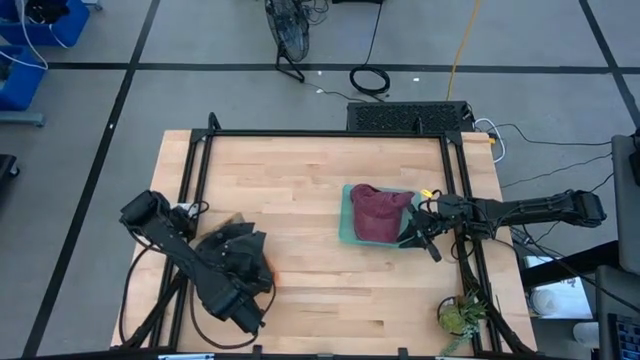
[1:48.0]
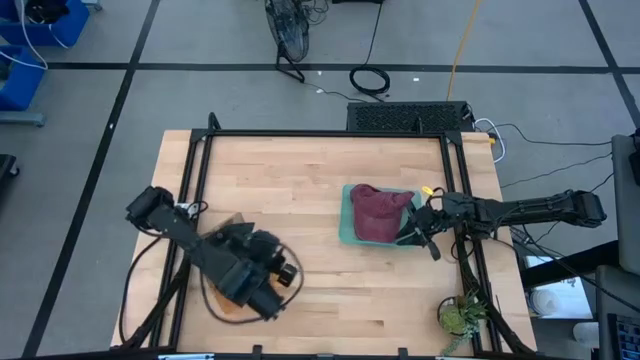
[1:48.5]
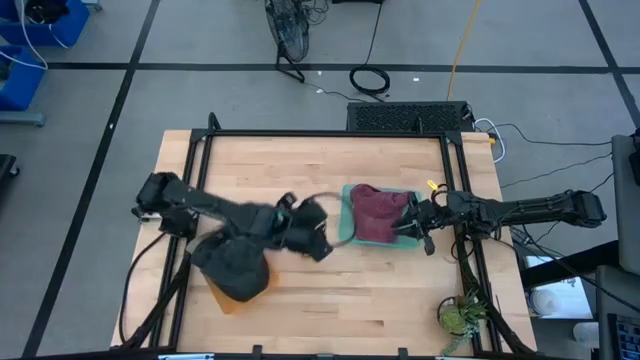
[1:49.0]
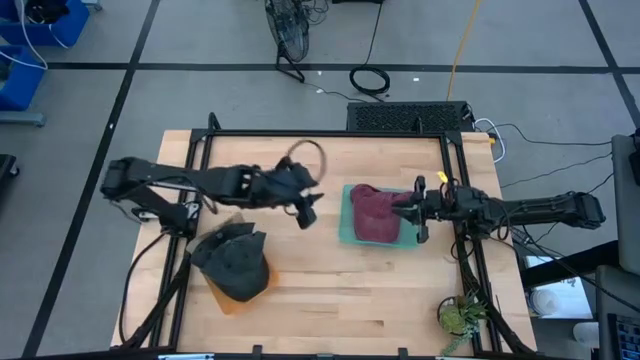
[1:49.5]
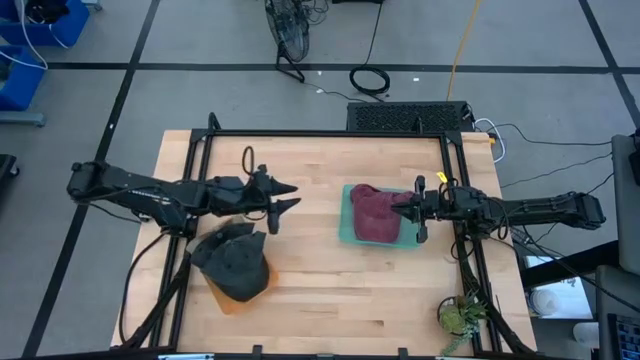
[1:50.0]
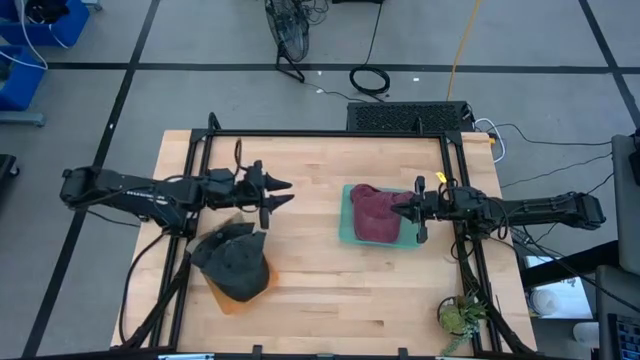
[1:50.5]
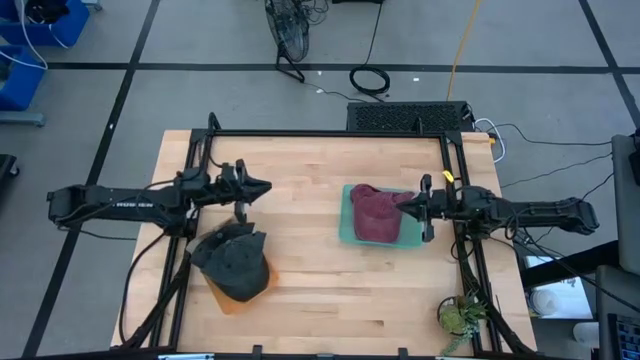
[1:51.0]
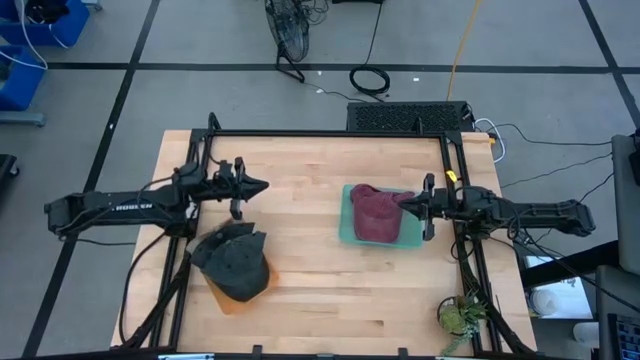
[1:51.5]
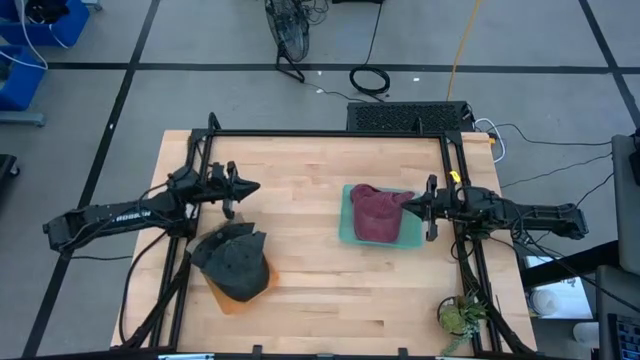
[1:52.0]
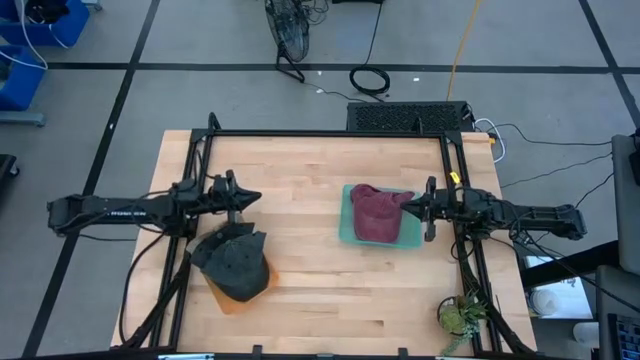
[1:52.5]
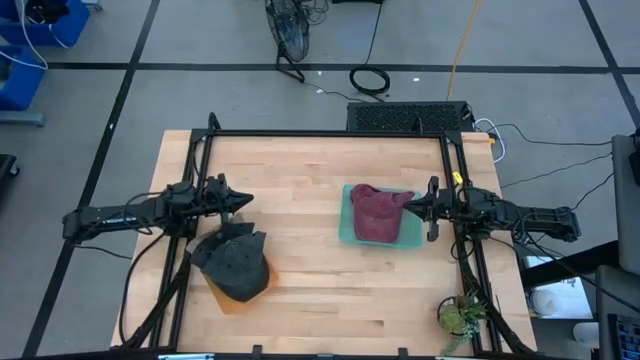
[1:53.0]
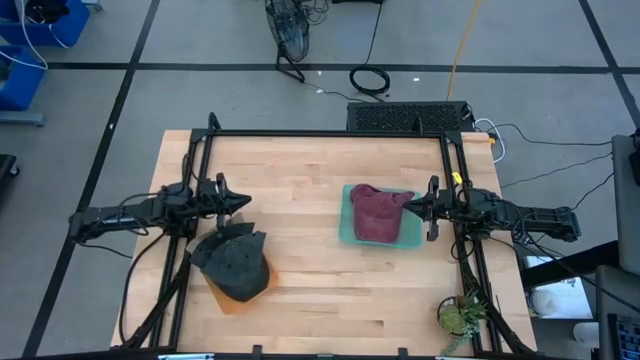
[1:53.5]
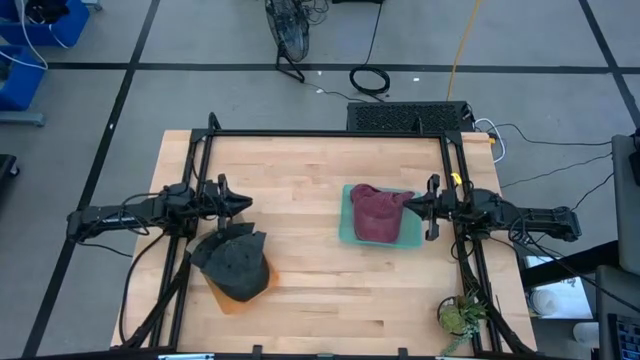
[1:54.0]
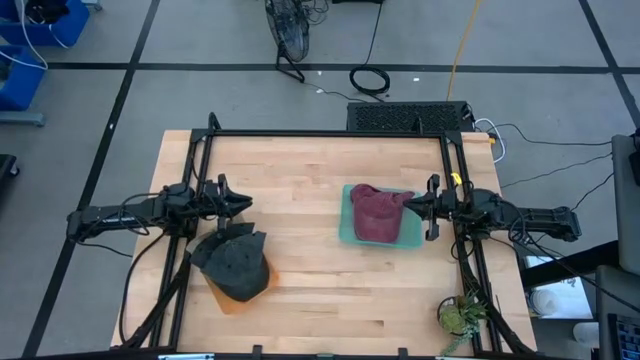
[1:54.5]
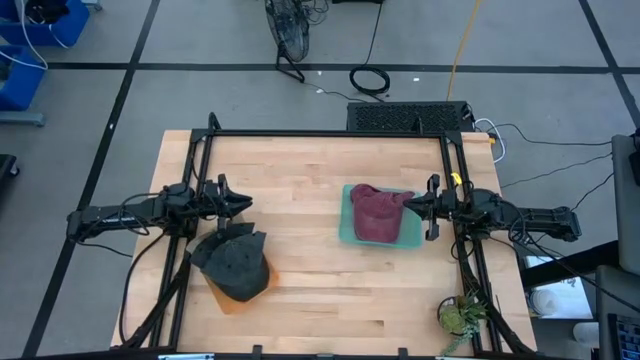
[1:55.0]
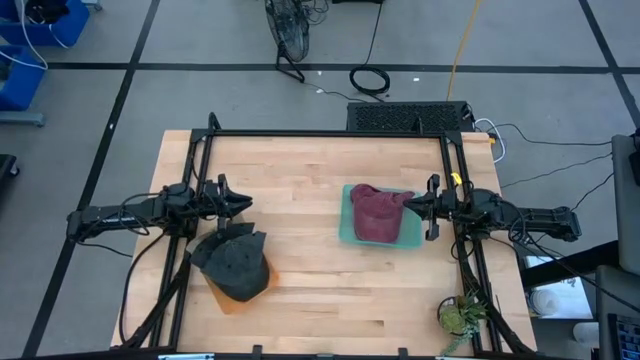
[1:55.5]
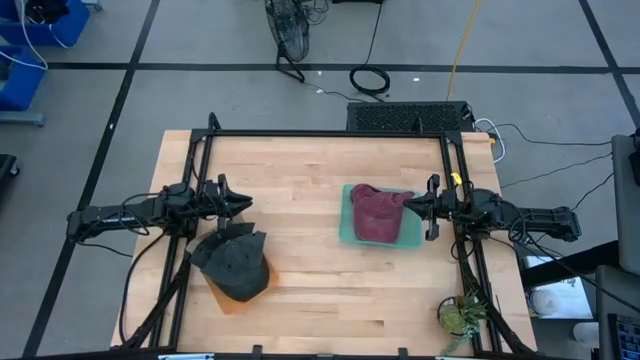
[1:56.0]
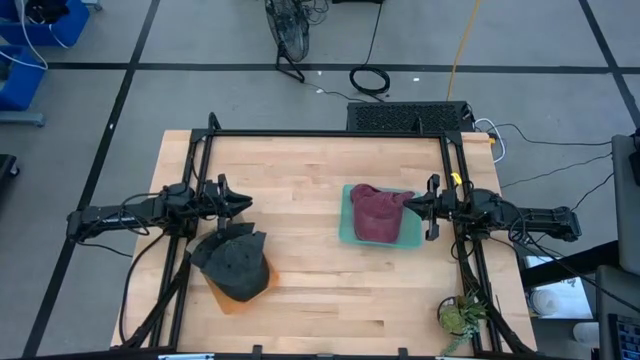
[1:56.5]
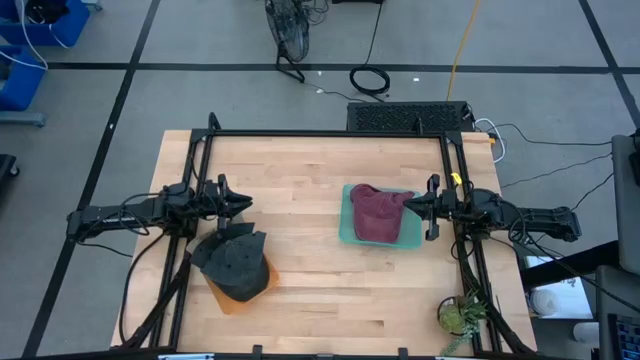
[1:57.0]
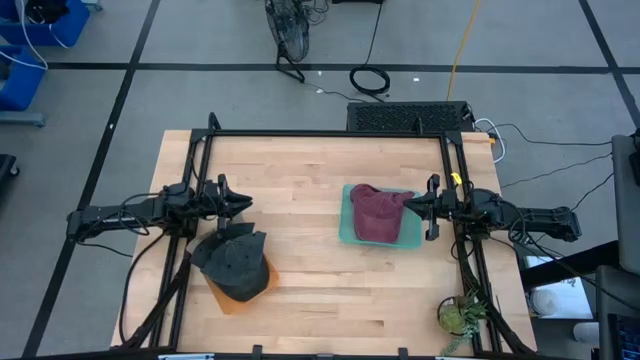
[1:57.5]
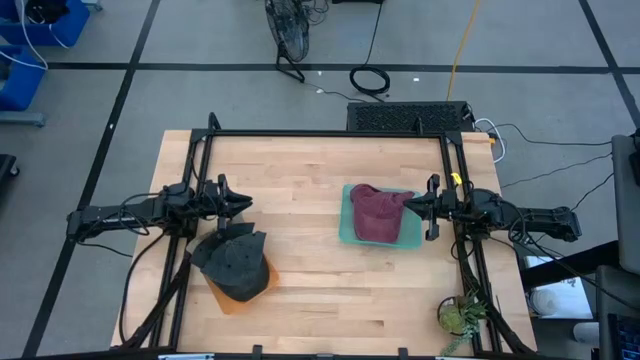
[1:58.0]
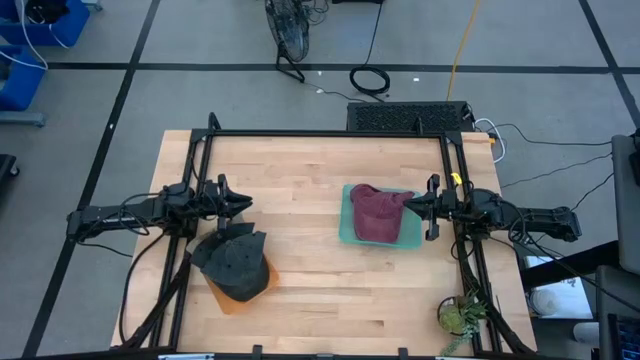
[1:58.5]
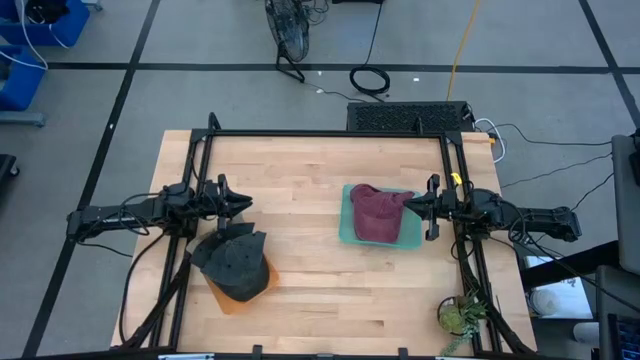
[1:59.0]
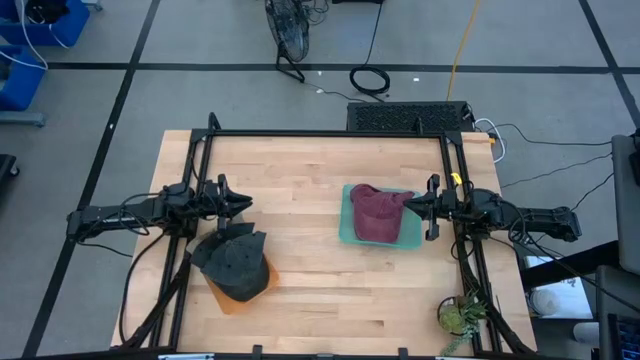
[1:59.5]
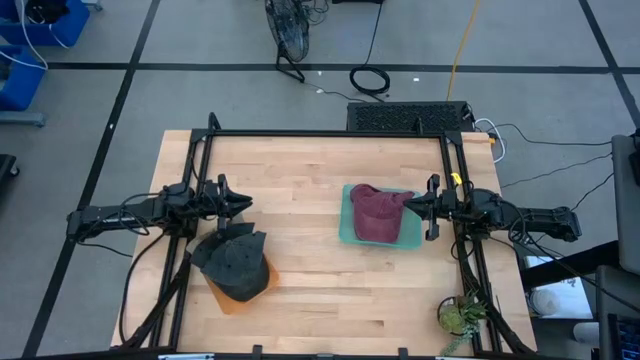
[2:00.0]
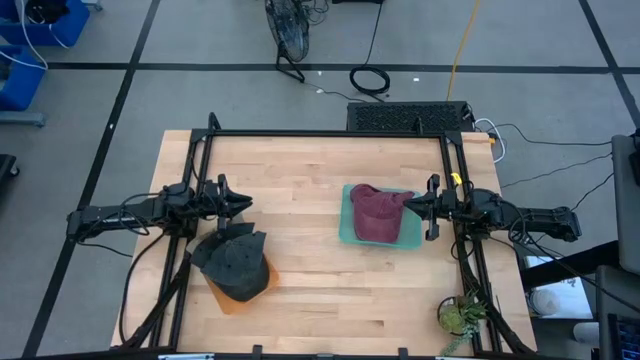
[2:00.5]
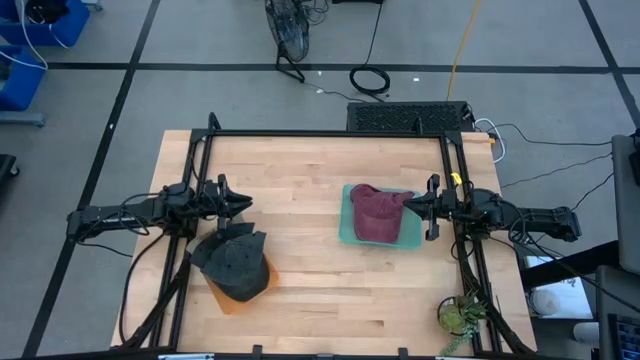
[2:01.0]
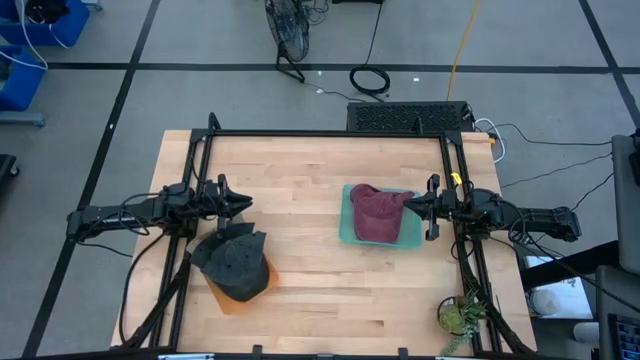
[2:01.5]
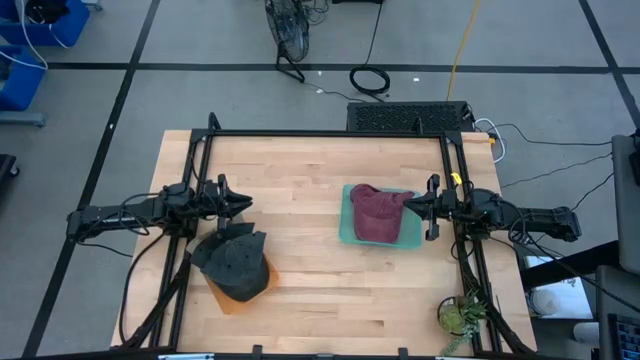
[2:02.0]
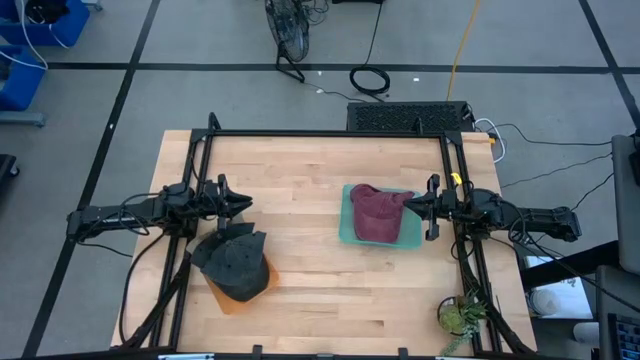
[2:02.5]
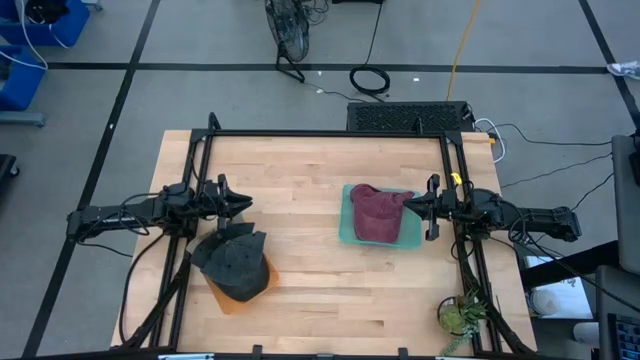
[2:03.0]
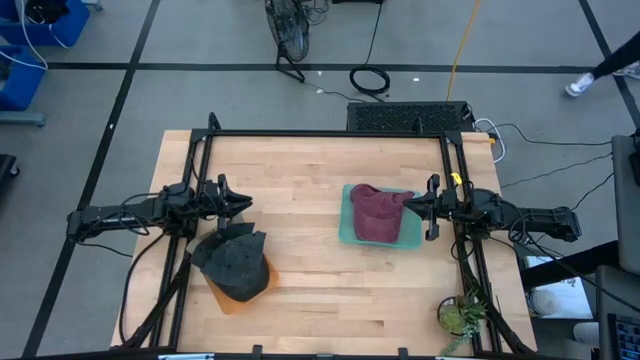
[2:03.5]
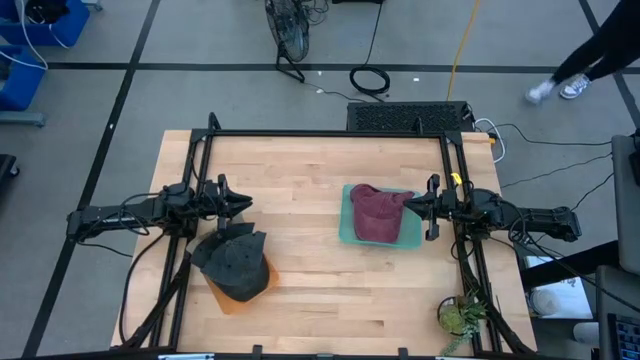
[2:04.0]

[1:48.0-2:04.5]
Task: Pick & Place hat
Return to Home Position

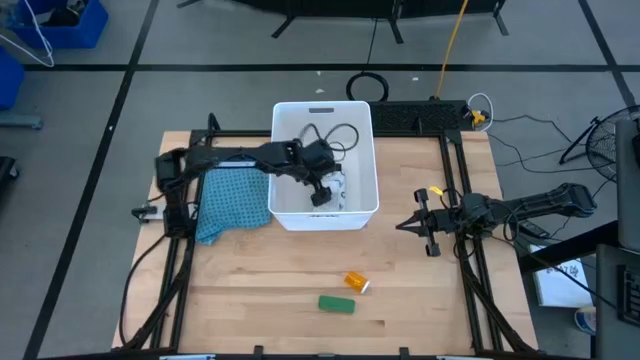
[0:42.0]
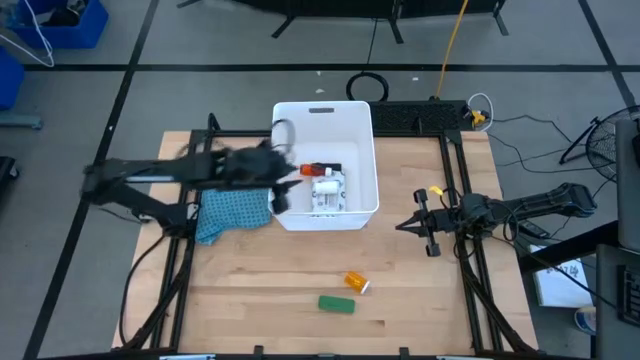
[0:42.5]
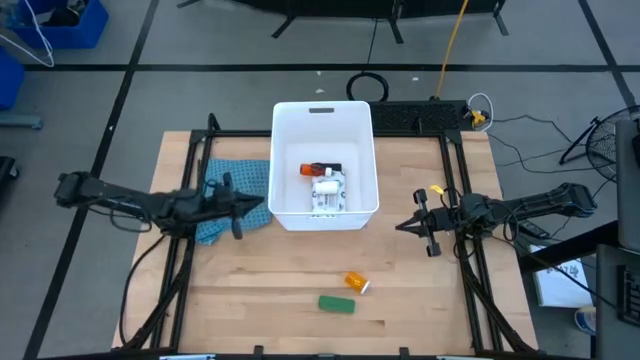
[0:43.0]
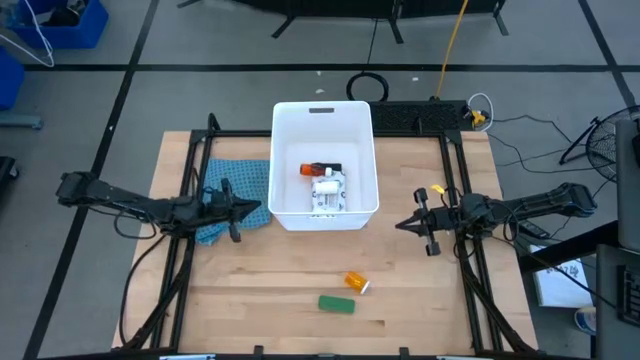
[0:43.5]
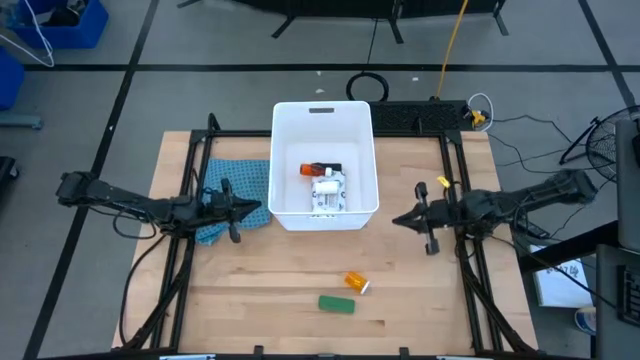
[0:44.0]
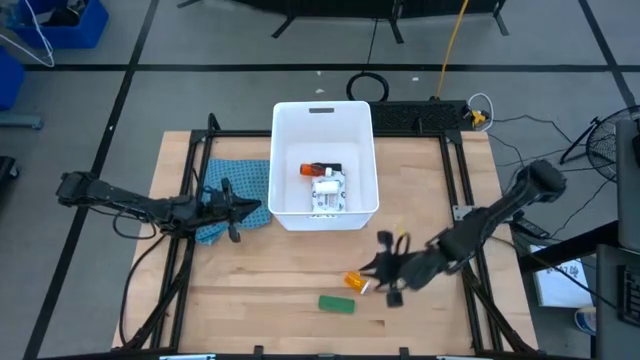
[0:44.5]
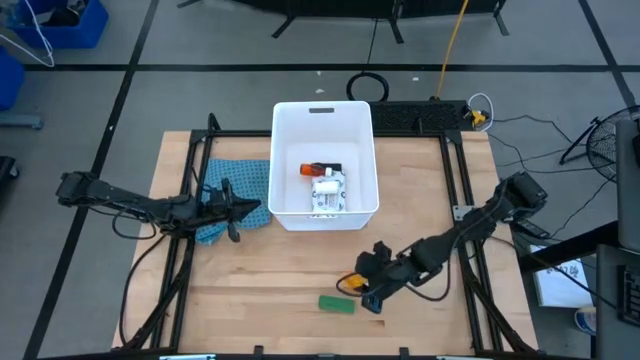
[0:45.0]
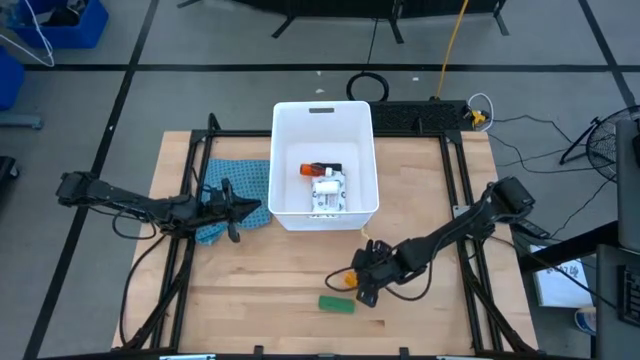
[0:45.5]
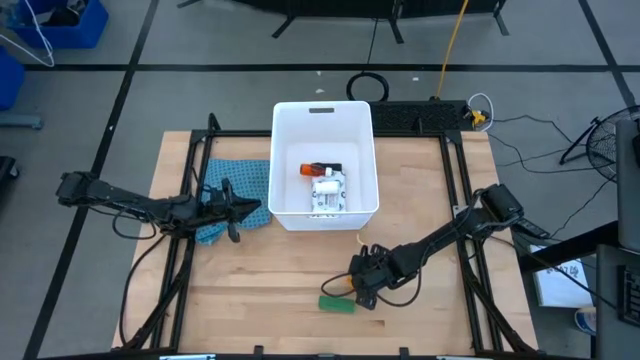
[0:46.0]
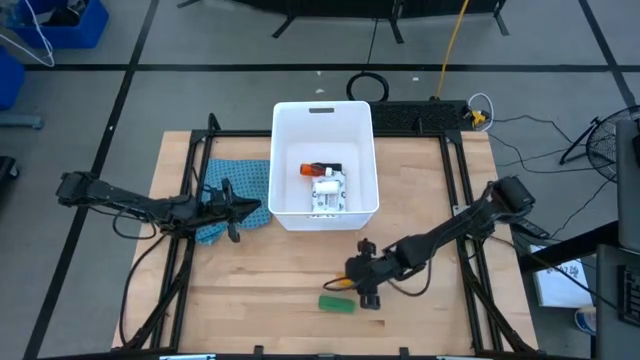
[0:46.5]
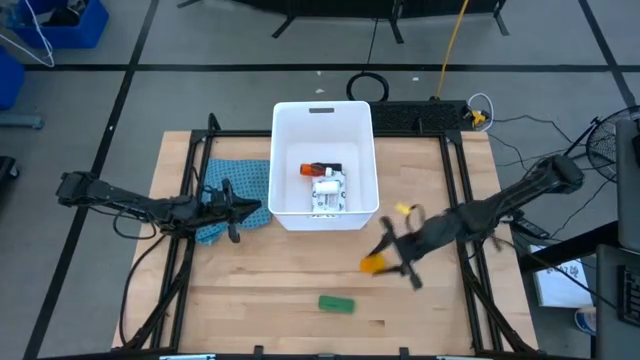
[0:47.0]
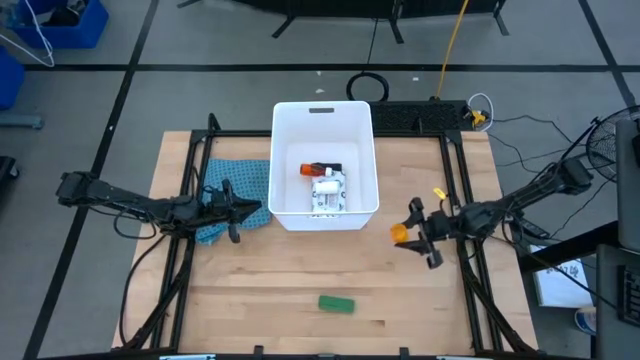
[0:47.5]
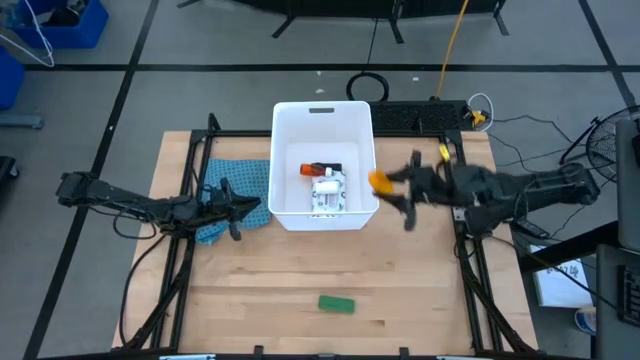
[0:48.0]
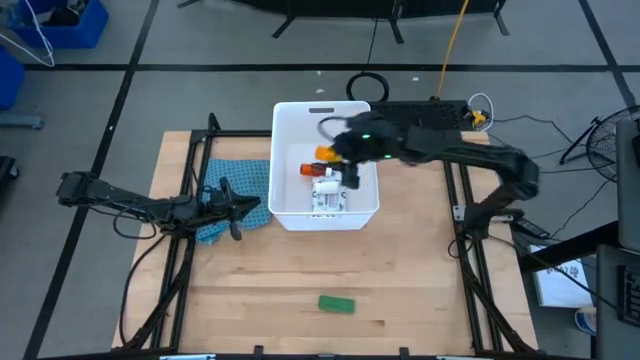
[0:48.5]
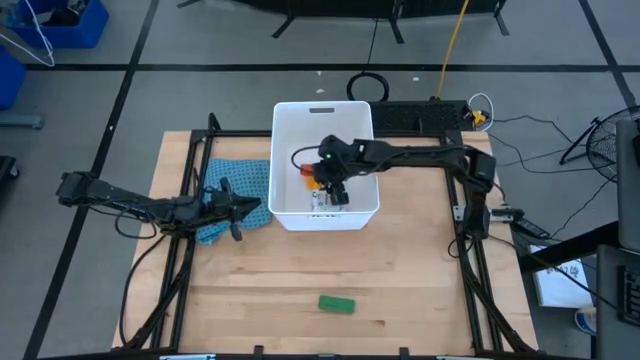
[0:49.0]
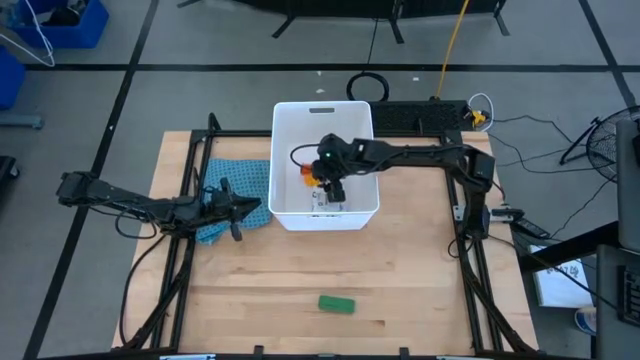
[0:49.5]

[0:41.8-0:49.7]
Task: Pick & place medical supplies in basket/bin
Put the yellow medicine bottle into the white container
